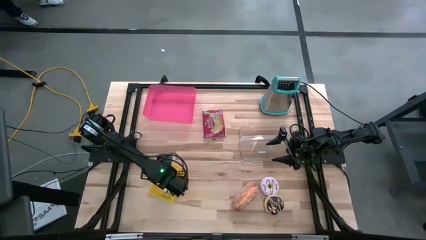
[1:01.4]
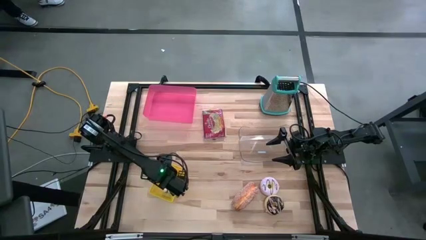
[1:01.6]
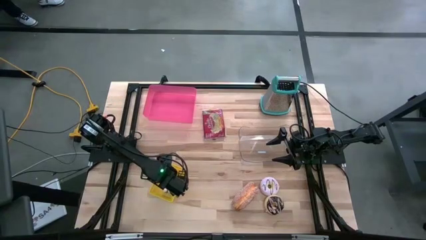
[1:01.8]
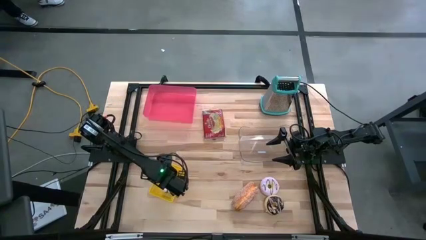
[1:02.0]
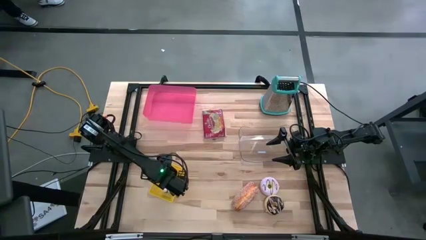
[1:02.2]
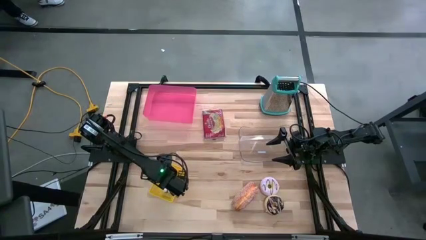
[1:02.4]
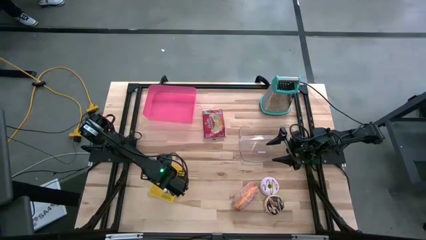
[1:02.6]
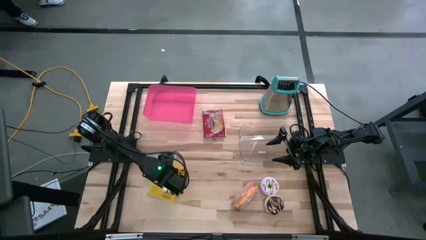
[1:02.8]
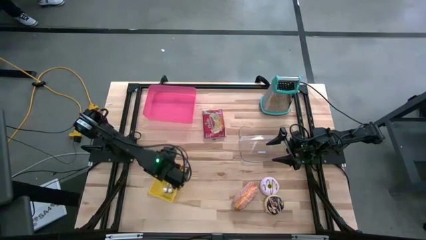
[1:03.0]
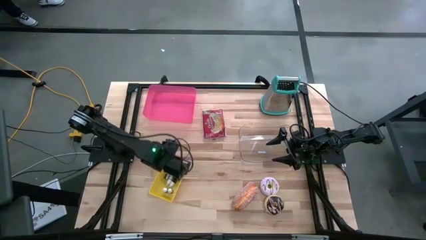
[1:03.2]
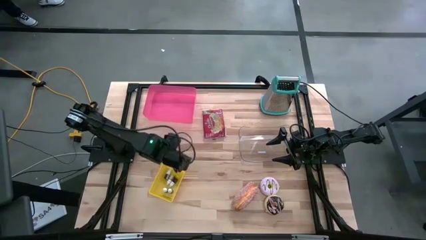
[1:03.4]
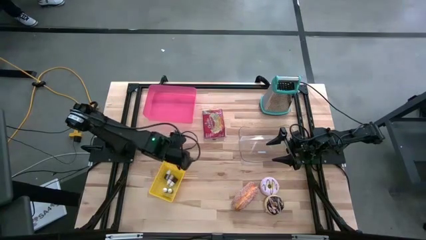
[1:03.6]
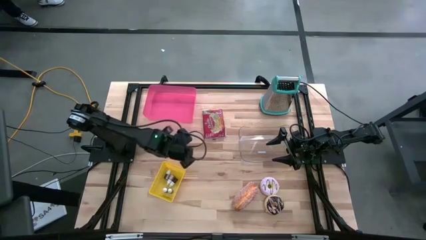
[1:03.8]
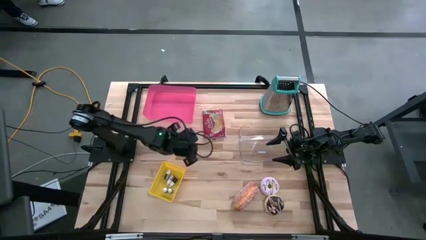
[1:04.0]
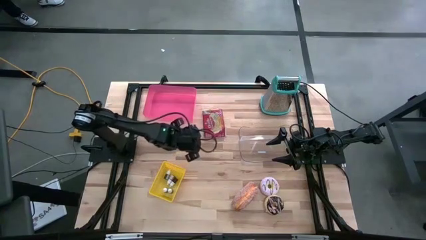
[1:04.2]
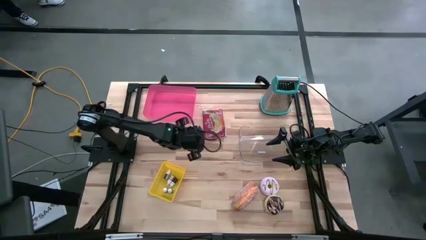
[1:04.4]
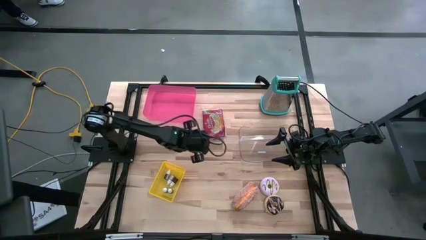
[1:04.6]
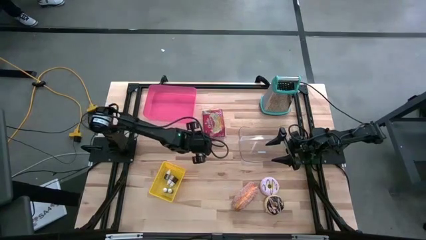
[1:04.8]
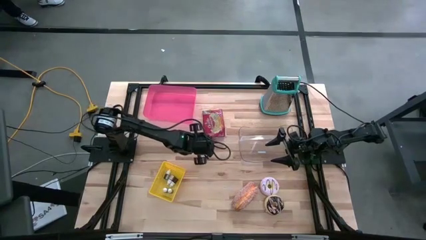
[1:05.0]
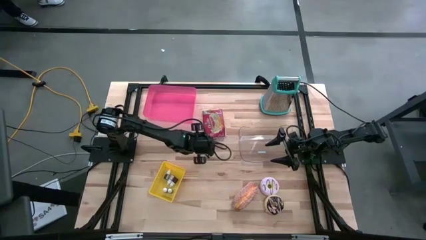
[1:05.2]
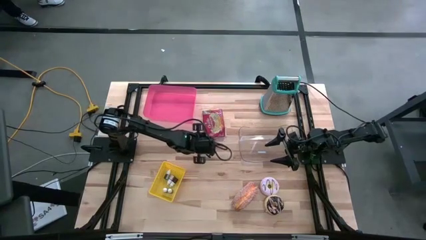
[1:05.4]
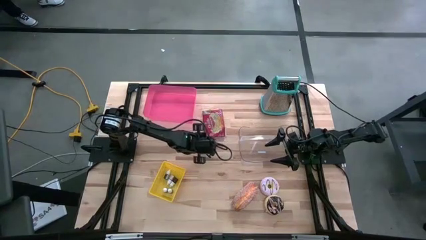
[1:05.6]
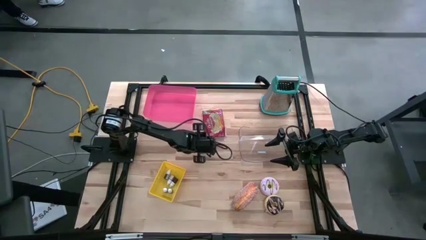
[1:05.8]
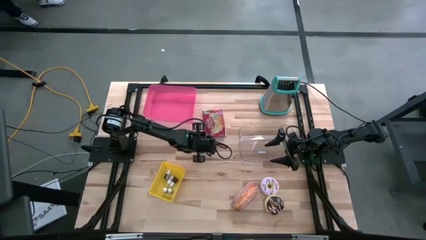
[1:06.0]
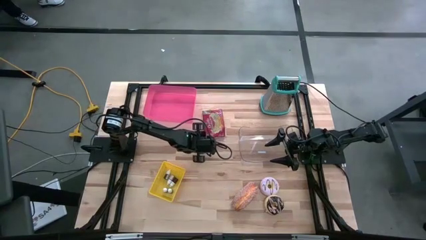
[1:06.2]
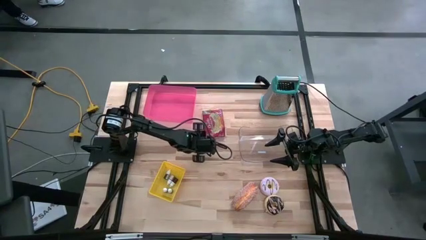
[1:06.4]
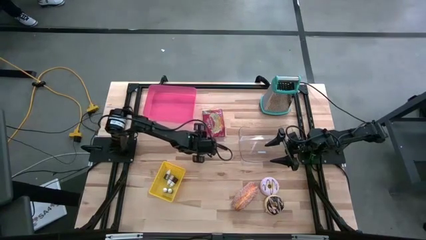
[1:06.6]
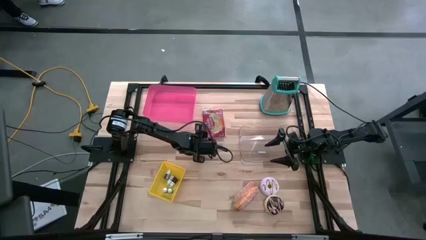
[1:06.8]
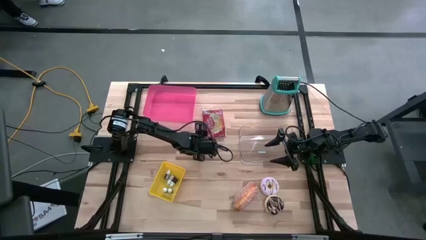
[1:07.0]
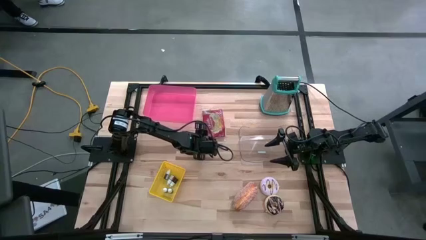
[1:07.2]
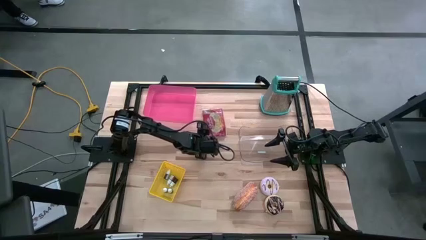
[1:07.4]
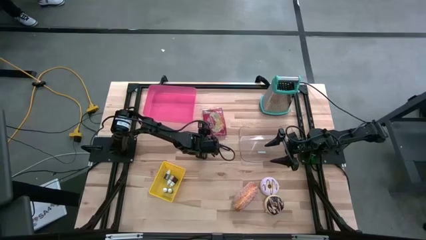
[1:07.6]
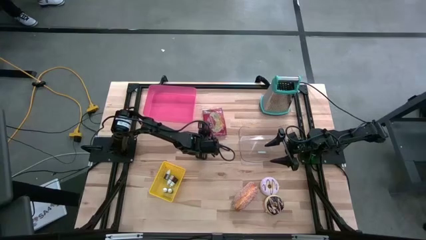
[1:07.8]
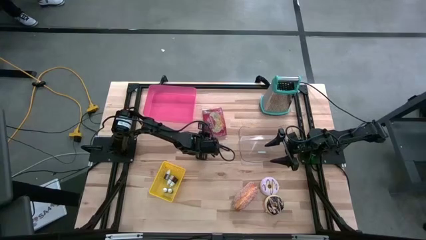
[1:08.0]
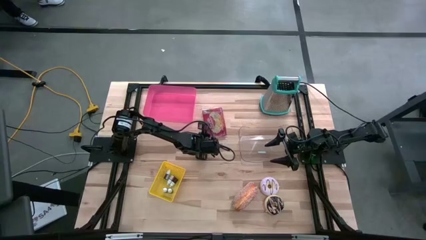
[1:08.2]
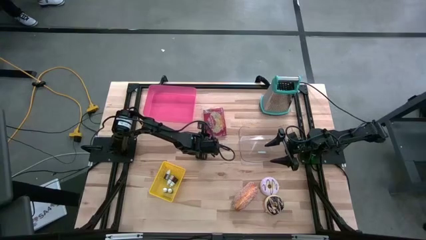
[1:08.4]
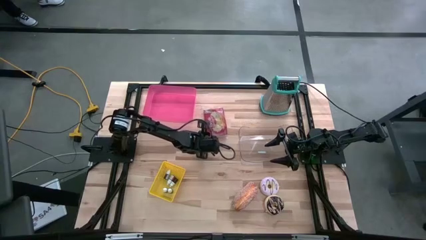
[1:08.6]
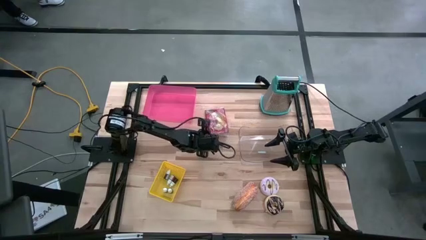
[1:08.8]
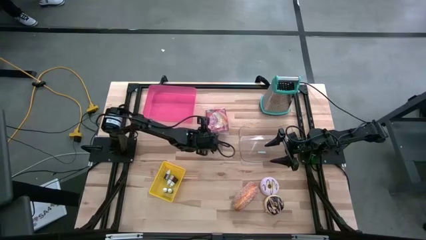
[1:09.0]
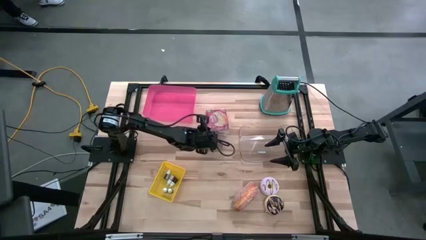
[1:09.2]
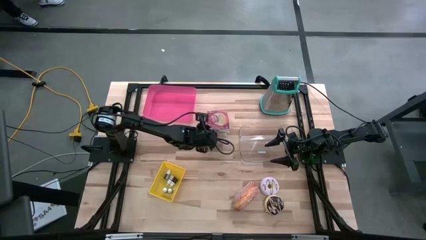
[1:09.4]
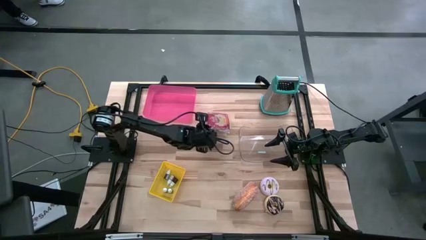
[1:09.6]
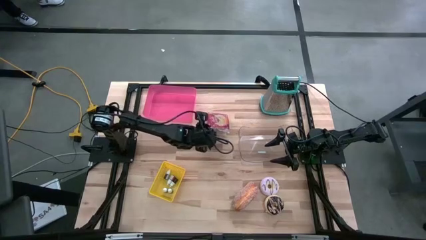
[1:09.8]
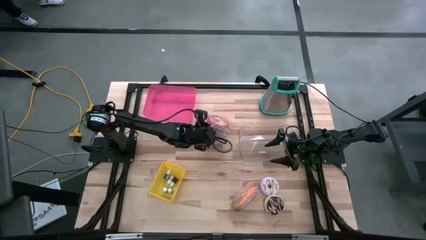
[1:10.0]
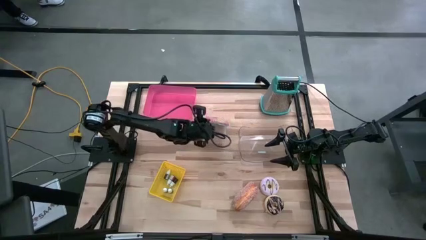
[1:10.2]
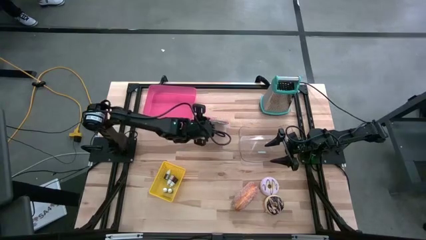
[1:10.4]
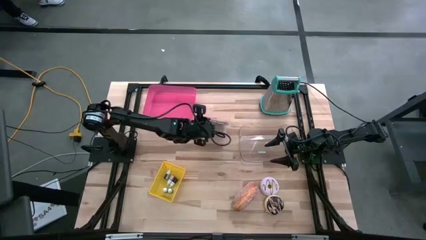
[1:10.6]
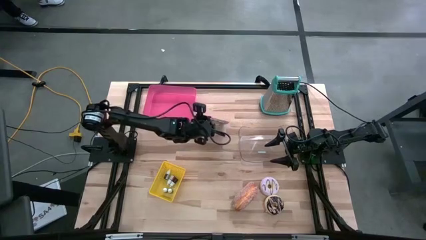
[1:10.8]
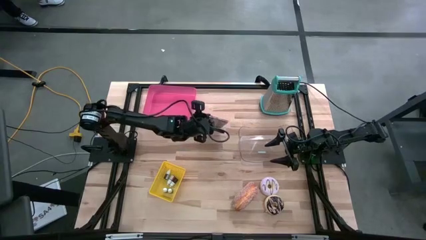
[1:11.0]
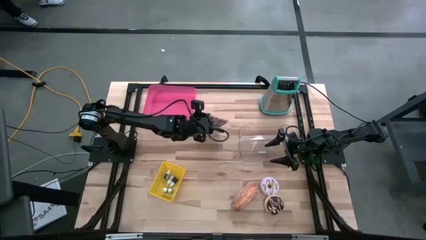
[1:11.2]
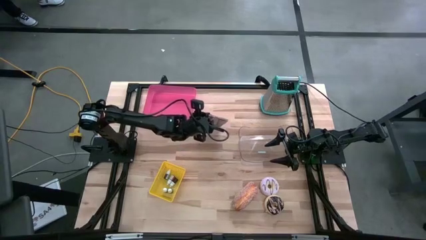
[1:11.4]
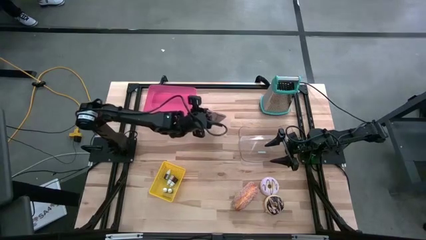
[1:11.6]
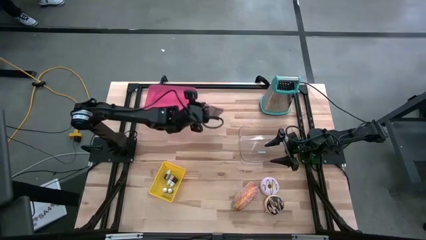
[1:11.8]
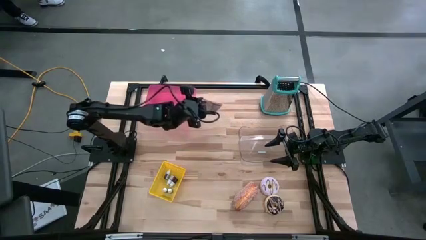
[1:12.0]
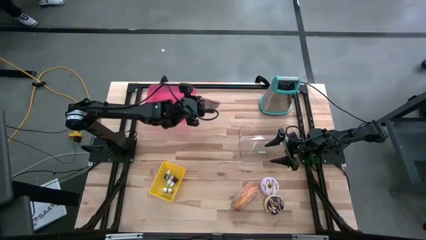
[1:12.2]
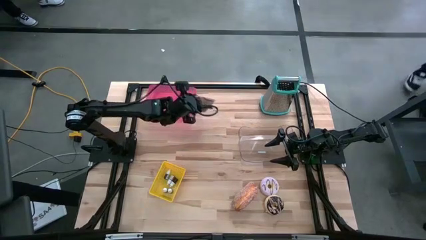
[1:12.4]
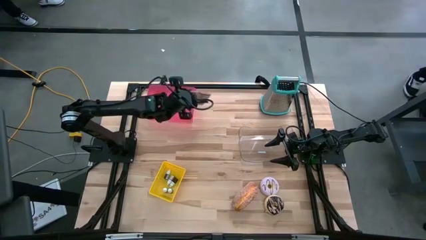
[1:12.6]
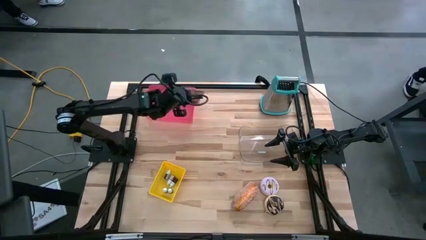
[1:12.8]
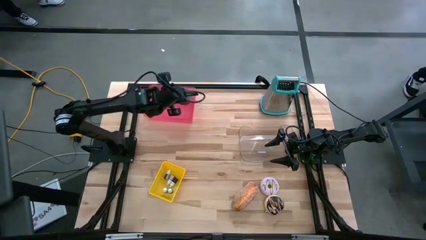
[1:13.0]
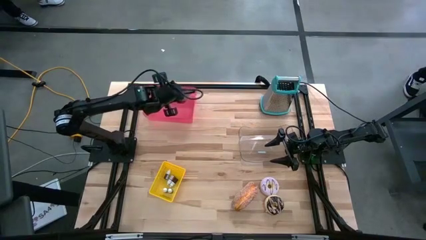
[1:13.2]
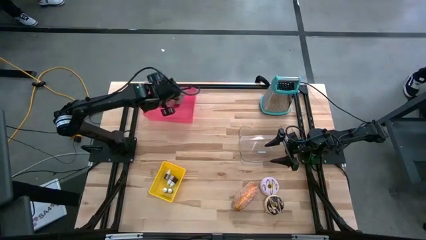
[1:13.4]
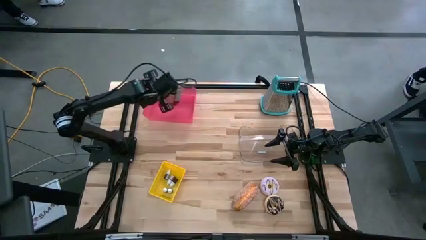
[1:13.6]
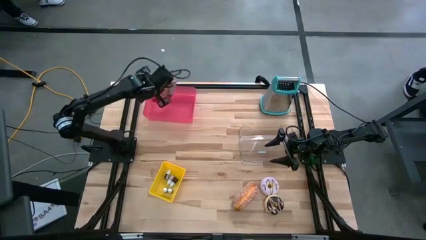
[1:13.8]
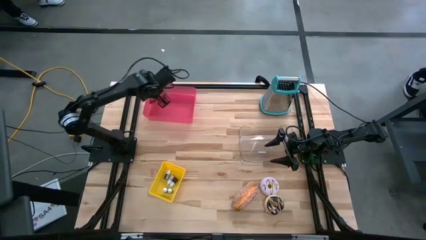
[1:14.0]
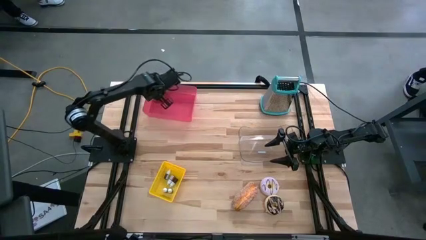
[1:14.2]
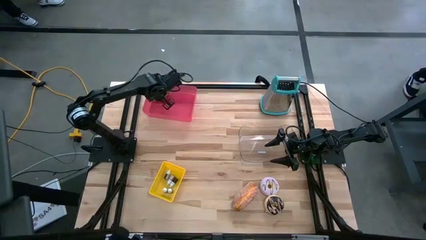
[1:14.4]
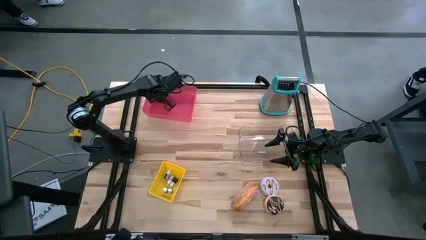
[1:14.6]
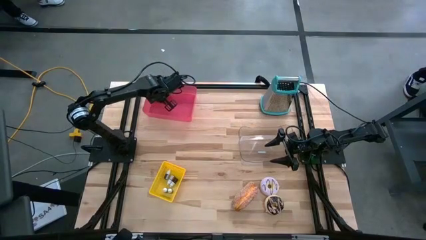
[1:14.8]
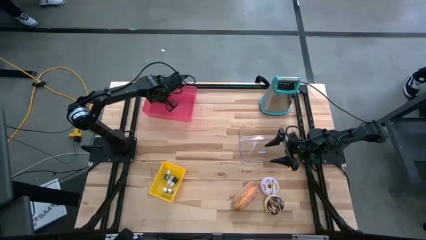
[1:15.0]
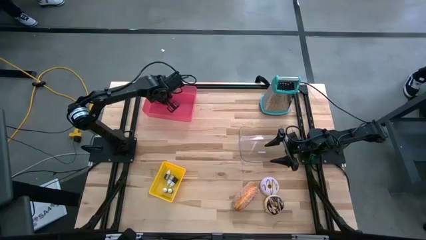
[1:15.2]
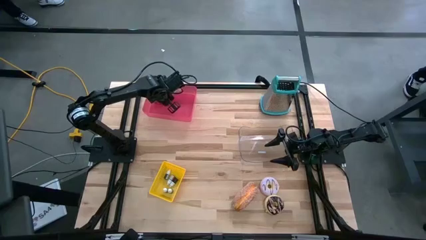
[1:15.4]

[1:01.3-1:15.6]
Put the red popcorn bag into the pink bin
